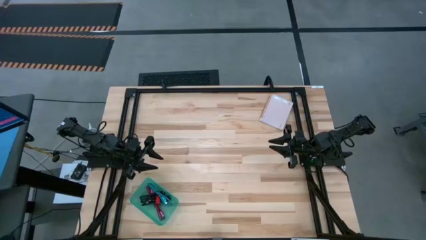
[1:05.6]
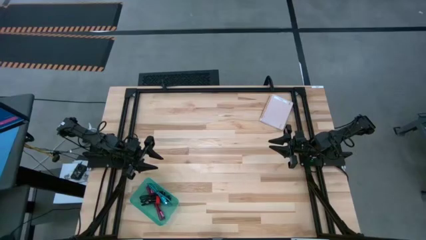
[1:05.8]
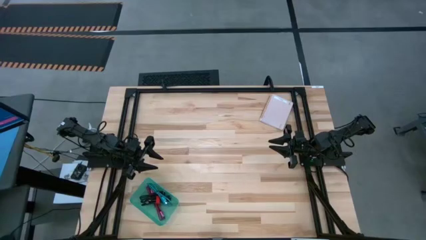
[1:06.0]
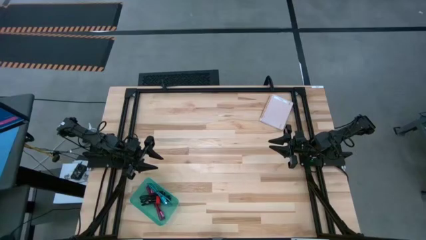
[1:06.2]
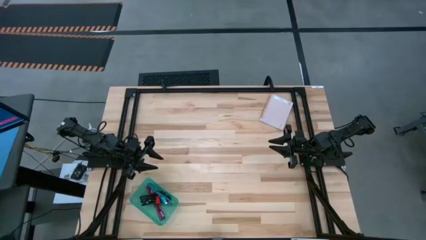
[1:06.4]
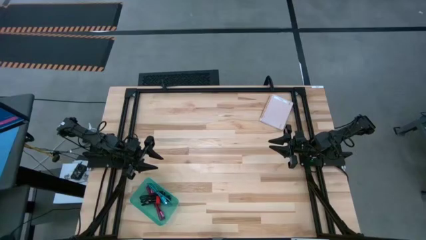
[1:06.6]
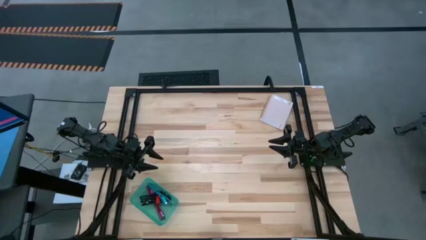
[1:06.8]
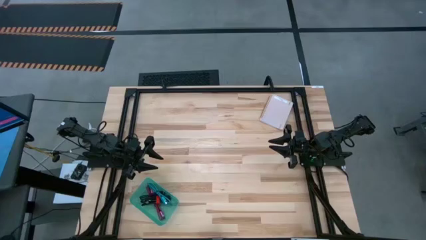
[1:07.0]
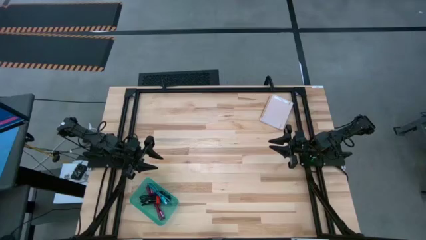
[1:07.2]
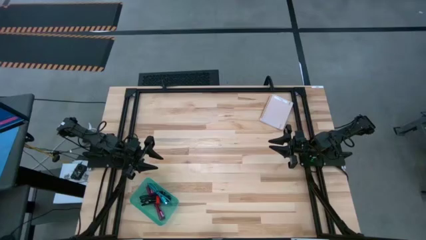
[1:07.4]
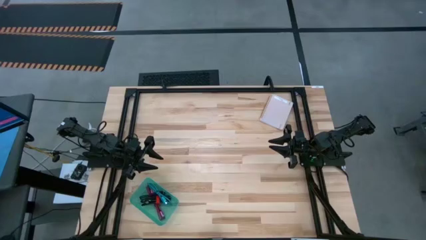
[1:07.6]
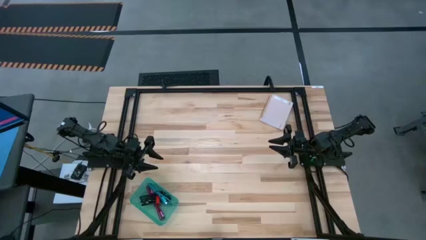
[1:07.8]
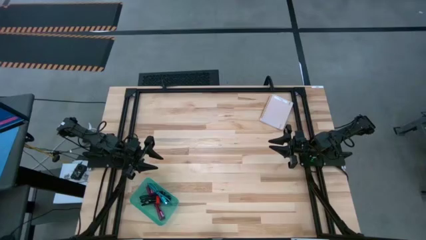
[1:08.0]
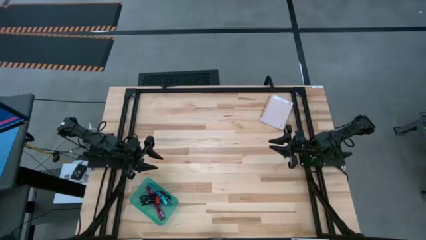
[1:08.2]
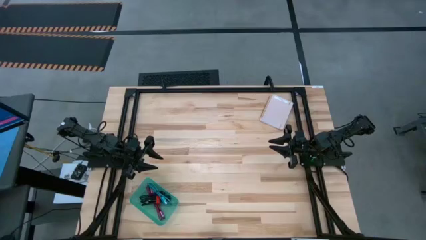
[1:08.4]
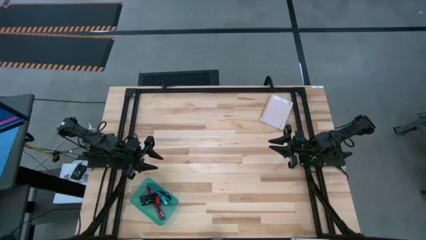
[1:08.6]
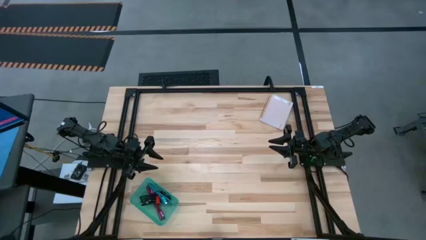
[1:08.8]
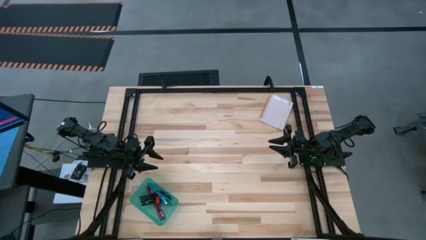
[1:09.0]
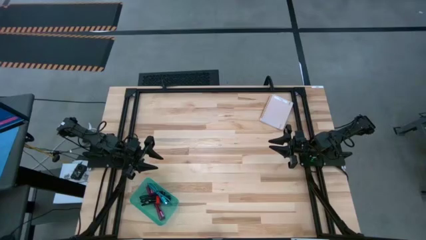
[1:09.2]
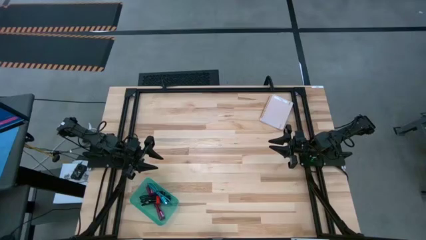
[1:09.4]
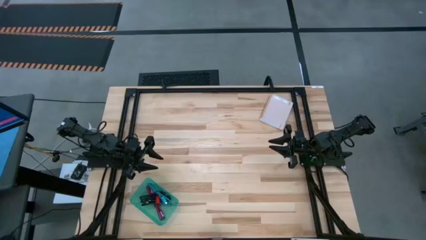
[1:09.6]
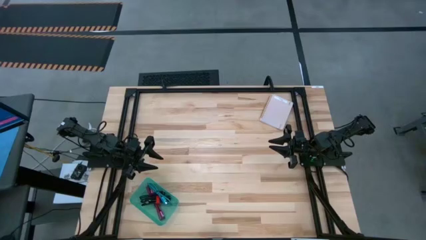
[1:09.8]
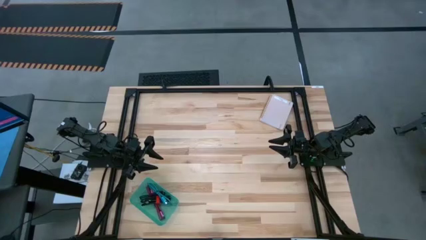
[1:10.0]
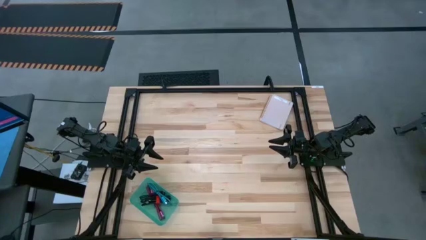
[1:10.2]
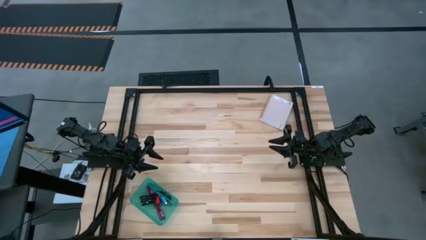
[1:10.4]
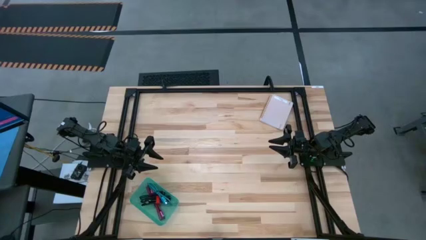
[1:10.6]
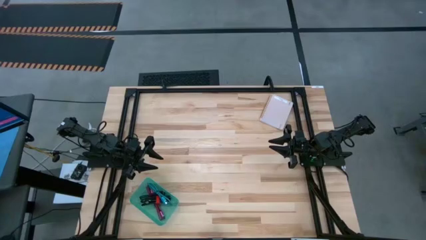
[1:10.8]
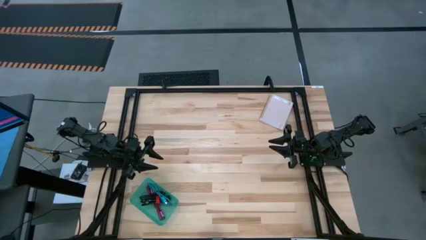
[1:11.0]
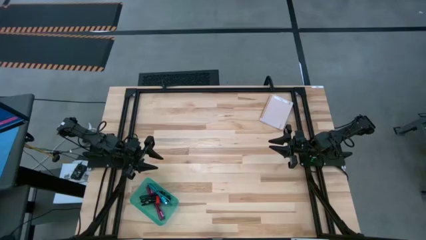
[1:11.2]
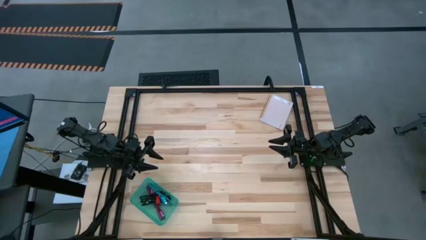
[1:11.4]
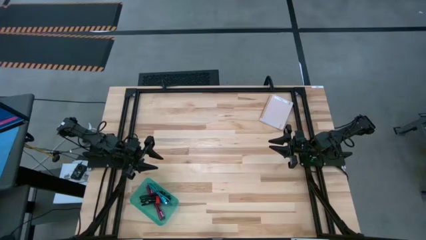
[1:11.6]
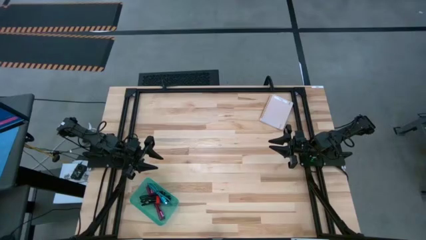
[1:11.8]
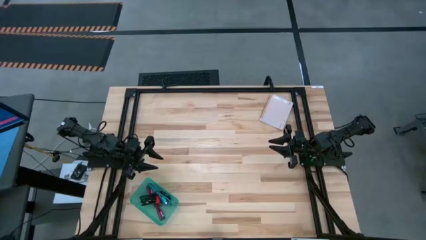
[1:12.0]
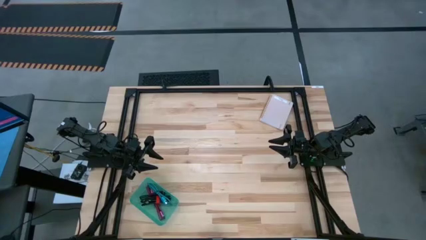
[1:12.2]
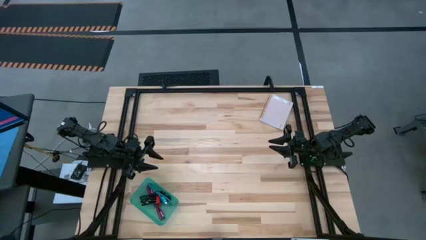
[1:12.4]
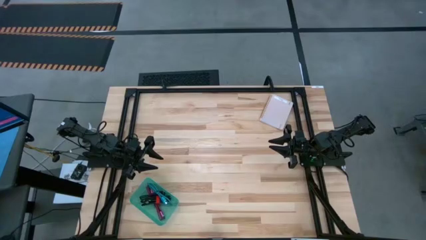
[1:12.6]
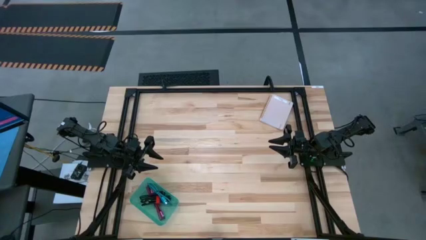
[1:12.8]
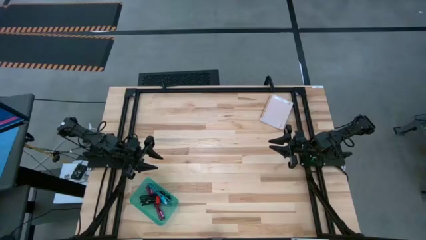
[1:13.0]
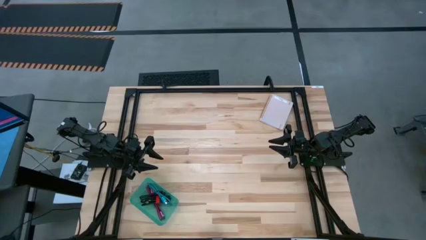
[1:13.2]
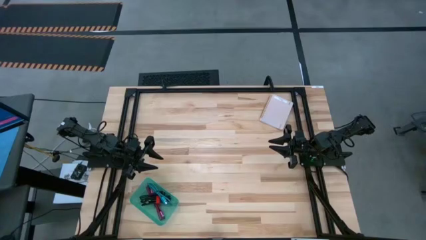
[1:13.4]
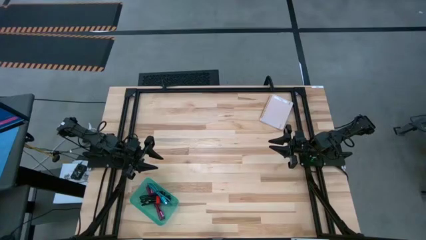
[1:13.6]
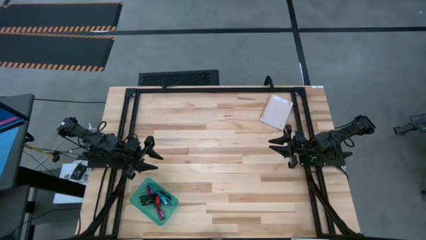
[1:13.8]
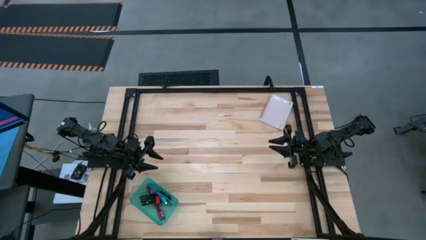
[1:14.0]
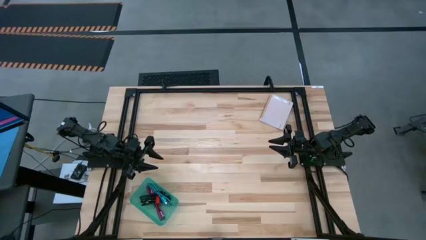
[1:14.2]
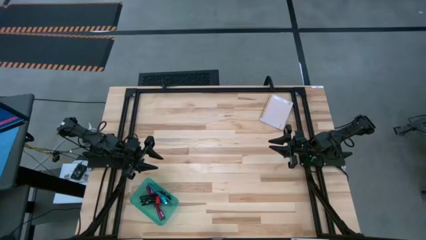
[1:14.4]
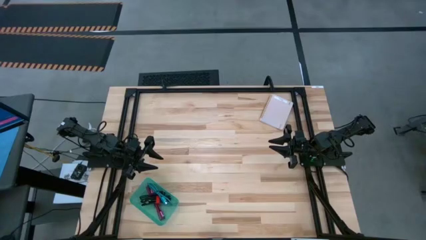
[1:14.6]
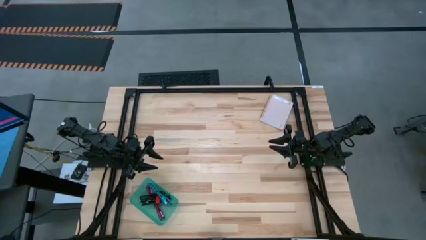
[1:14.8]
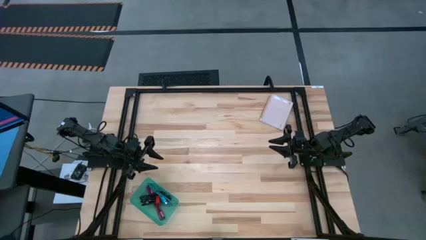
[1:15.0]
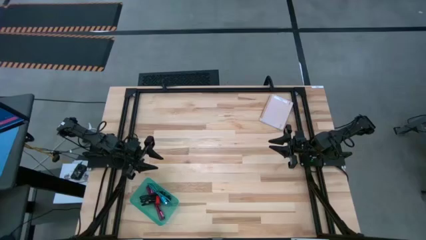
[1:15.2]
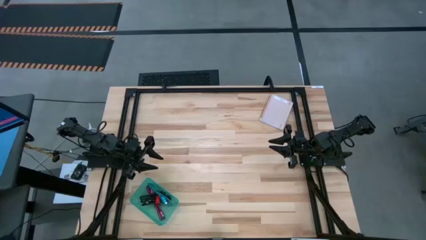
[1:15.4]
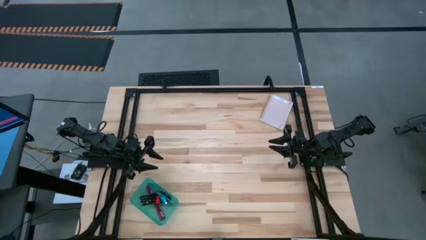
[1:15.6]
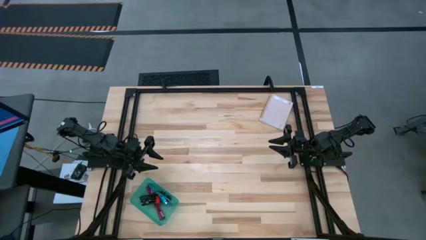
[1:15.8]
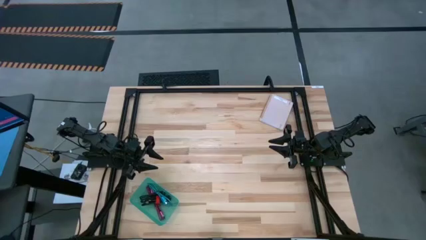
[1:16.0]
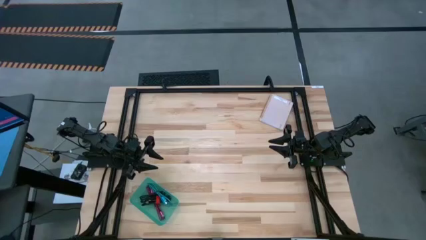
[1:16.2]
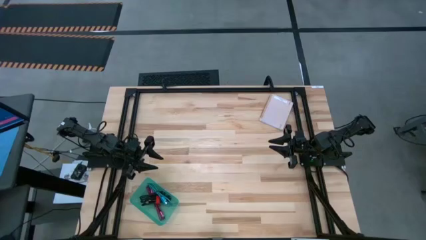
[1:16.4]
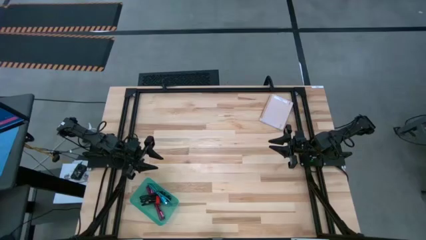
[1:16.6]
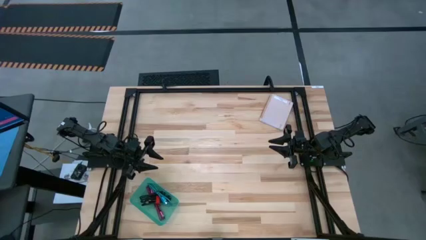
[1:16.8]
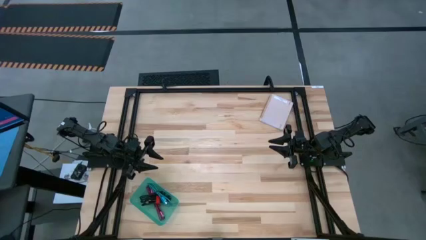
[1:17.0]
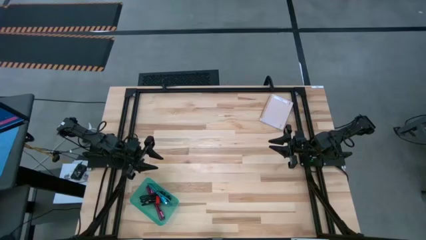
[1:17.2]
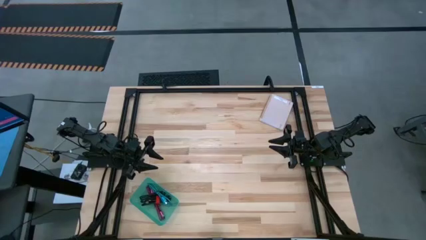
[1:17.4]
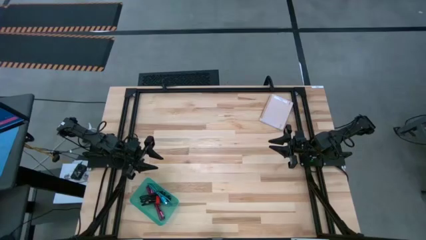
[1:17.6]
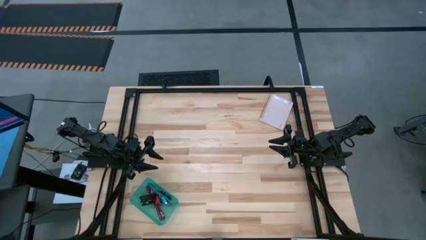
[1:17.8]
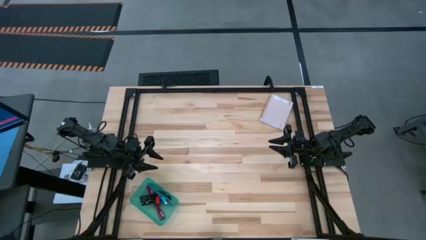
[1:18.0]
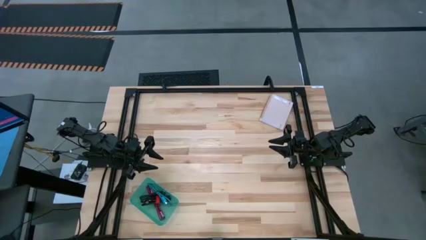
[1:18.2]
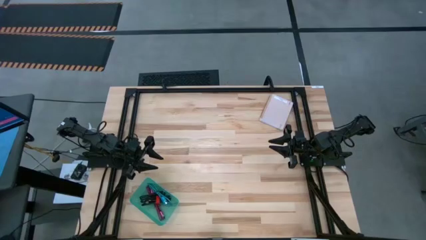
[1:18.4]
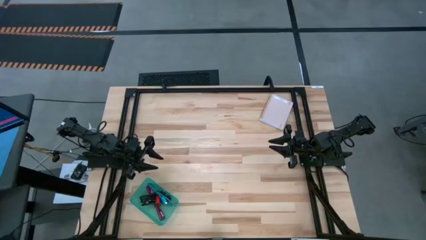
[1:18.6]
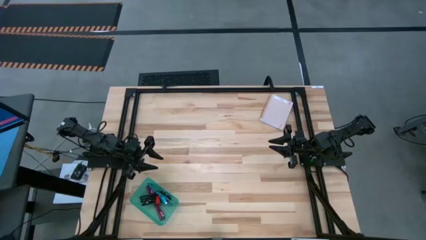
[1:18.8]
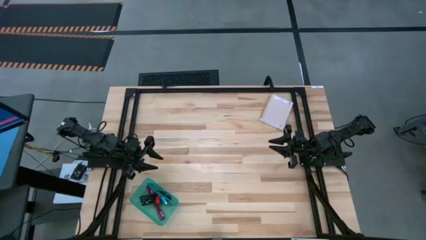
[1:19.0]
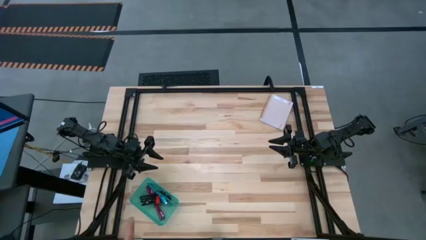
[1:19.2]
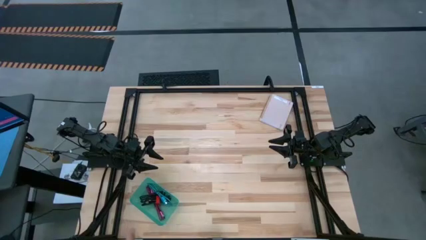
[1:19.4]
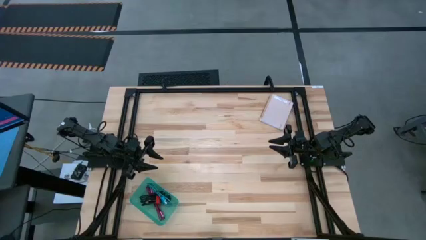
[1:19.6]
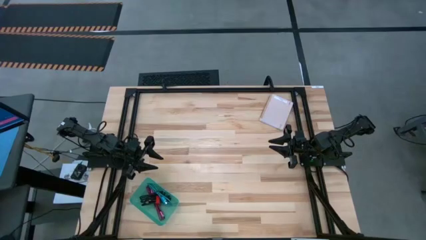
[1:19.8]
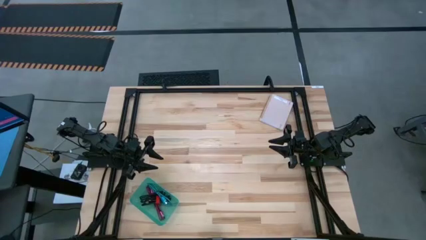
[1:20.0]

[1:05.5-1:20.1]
Task: Pick and place USB-C Cables
Return to Home Position
